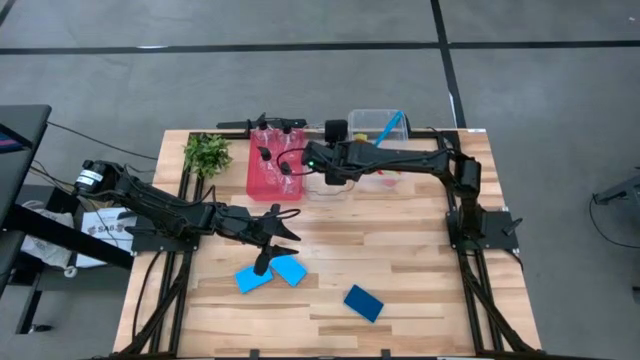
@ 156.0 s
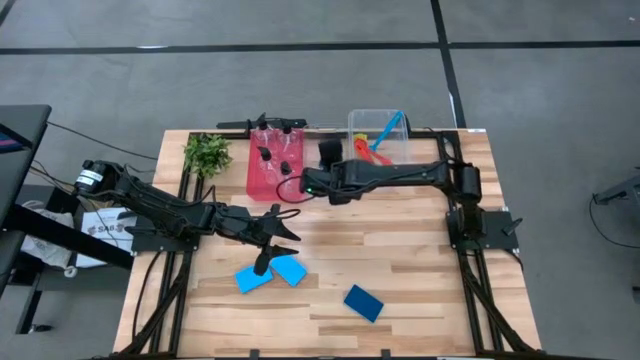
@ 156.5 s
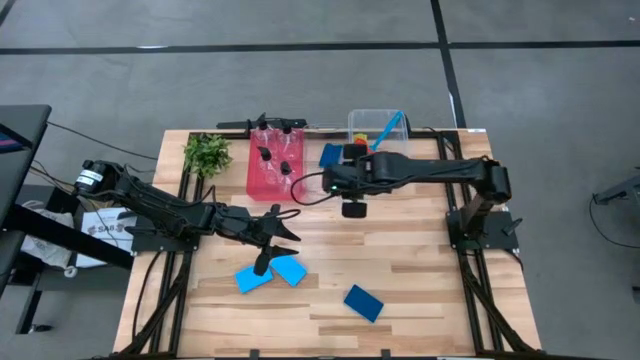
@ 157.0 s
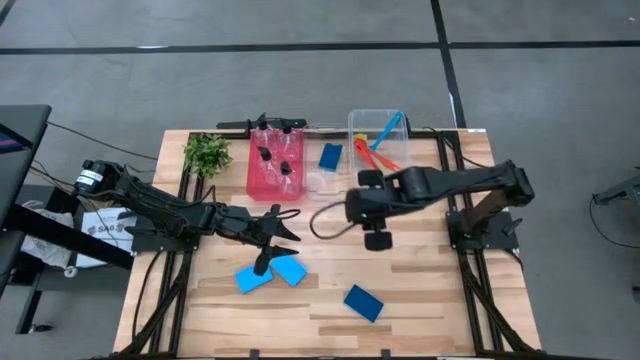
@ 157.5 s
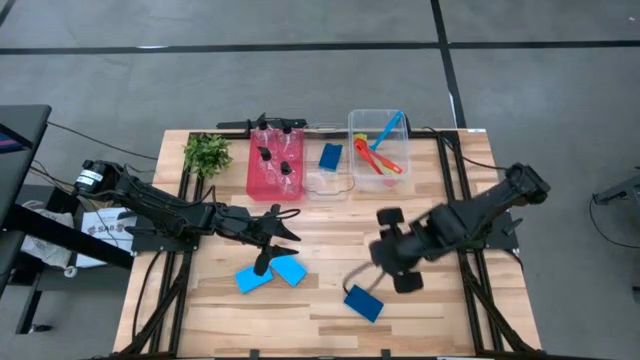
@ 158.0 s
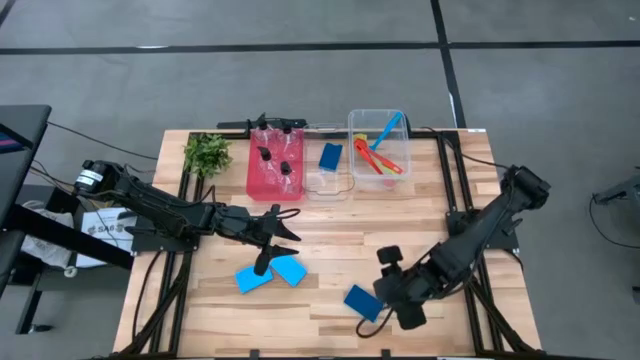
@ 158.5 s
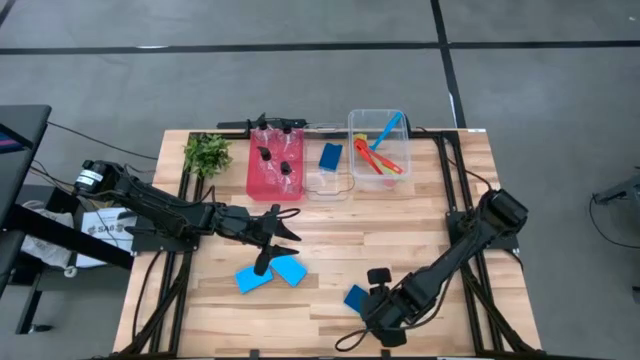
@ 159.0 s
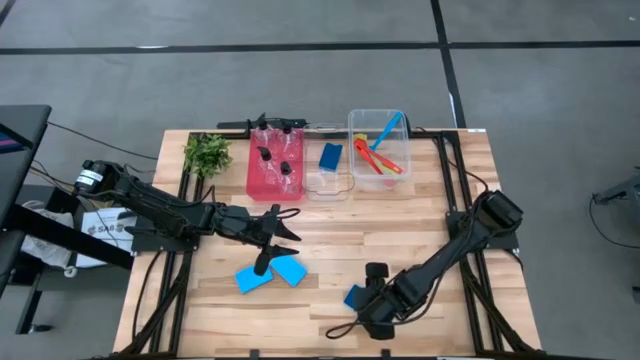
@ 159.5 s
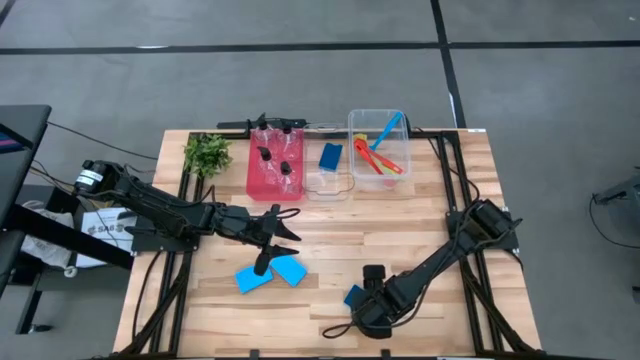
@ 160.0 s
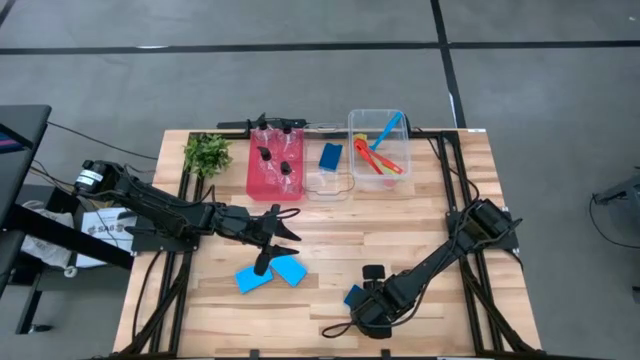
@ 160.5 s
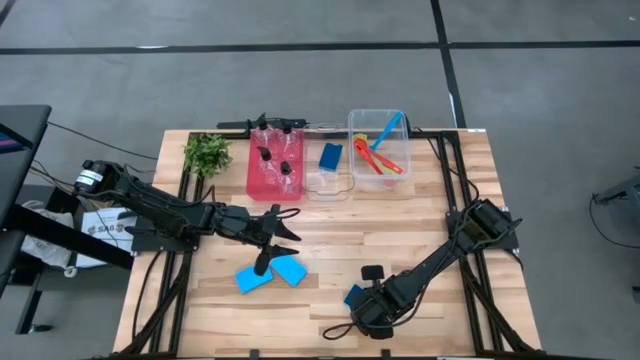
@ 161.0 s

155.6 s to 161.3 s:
Task: Pick & Place Kitchen Sink Supplies
Put the bottom blue sponge into the left transparent bin

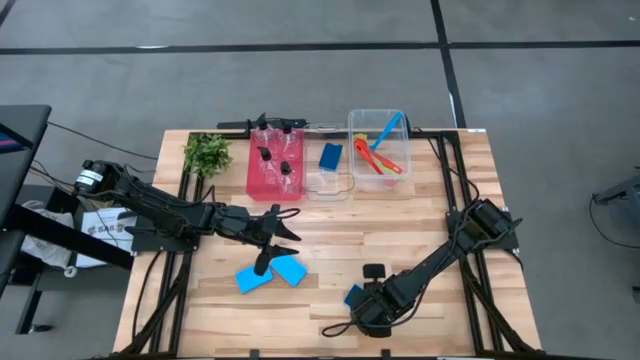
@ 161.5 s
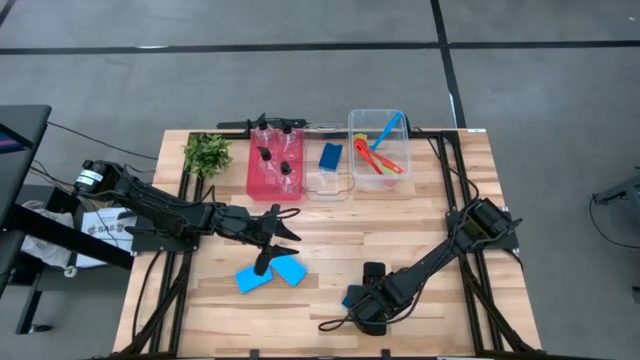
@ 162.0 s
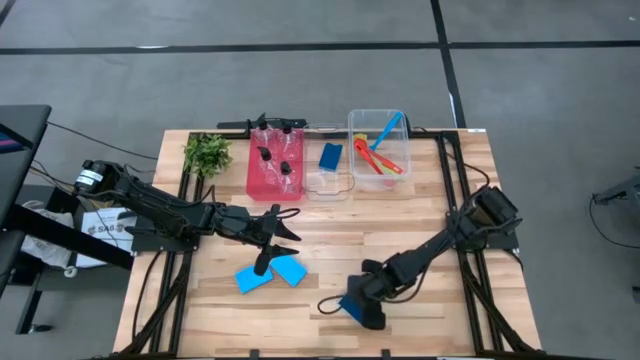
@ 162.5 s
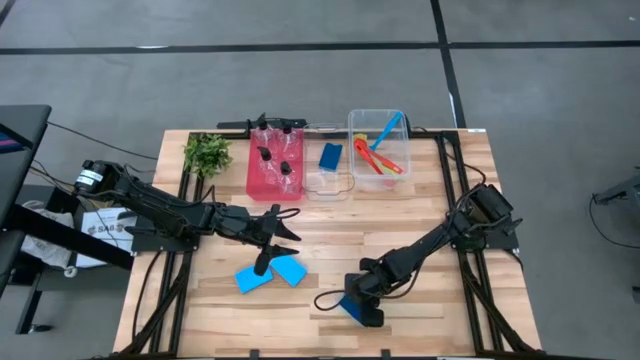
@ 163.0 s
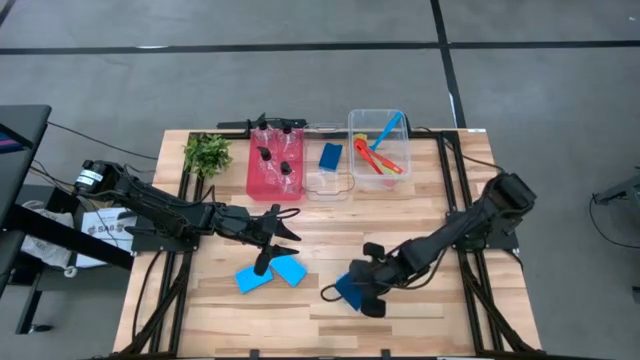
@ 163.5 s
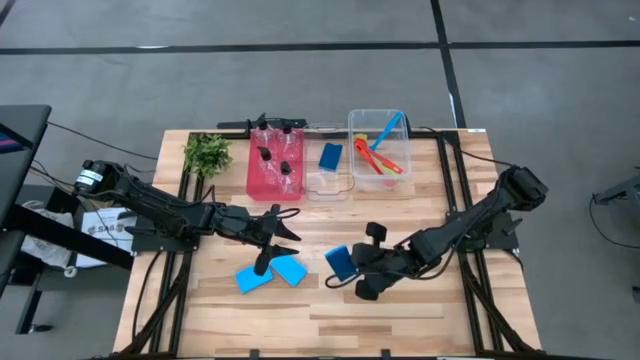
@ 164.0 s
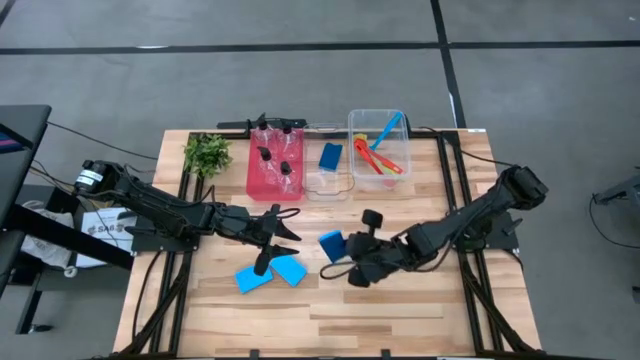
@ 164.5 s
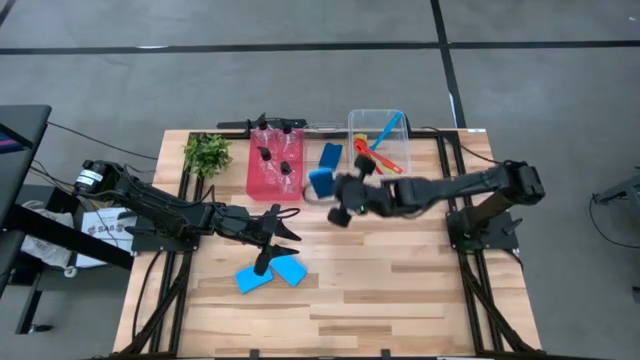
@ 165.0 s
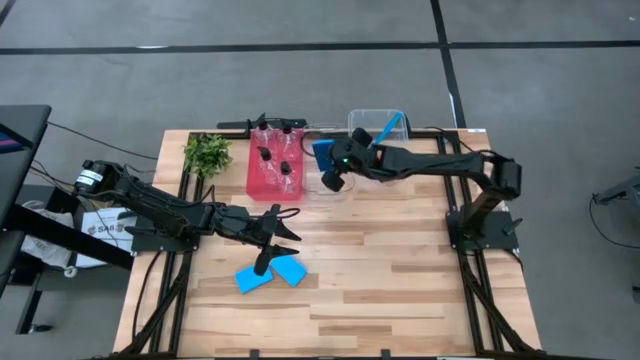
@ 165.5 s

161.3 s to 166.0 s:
Put the bottom blue sponge into the left transparent bin

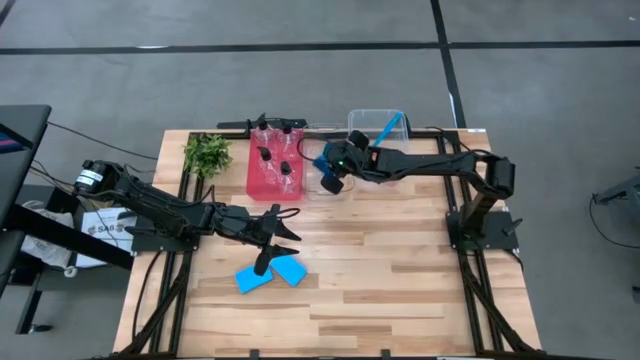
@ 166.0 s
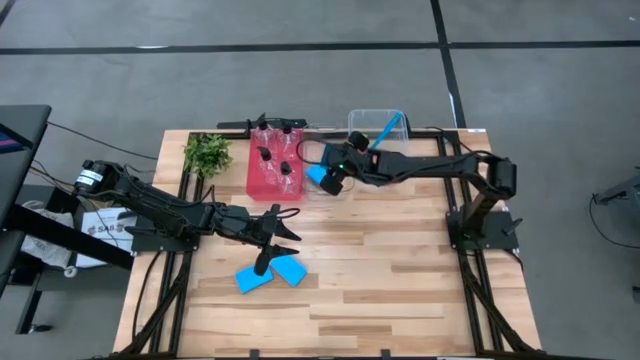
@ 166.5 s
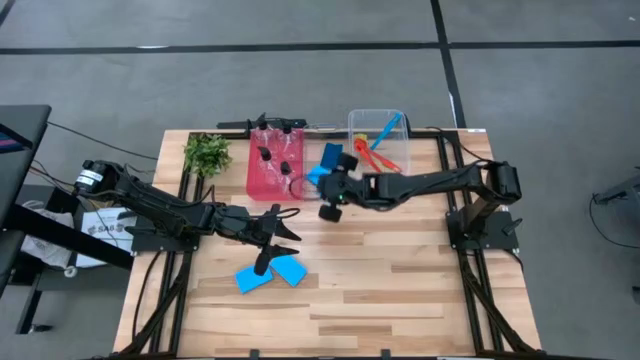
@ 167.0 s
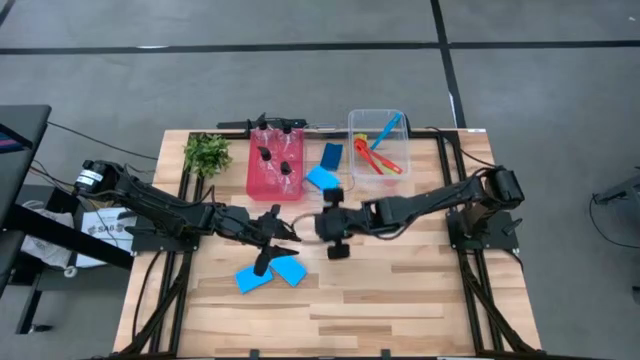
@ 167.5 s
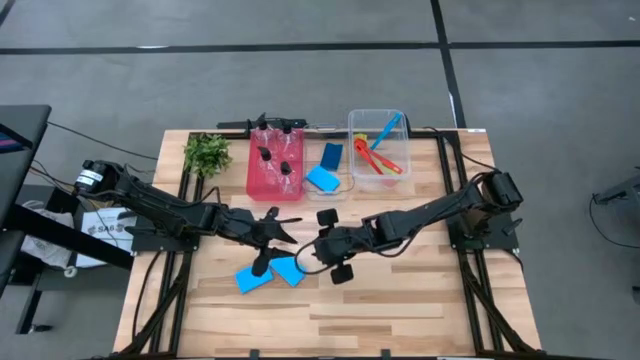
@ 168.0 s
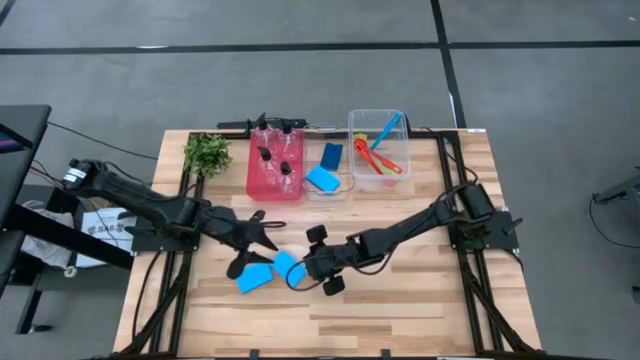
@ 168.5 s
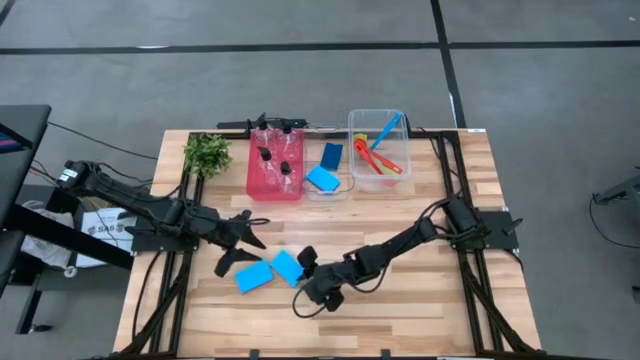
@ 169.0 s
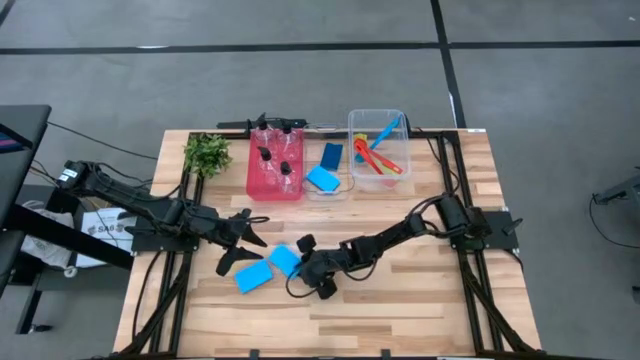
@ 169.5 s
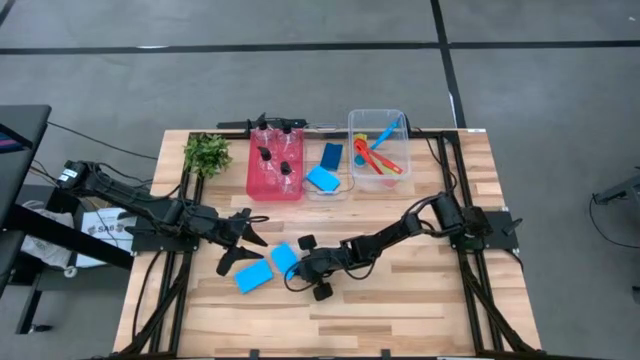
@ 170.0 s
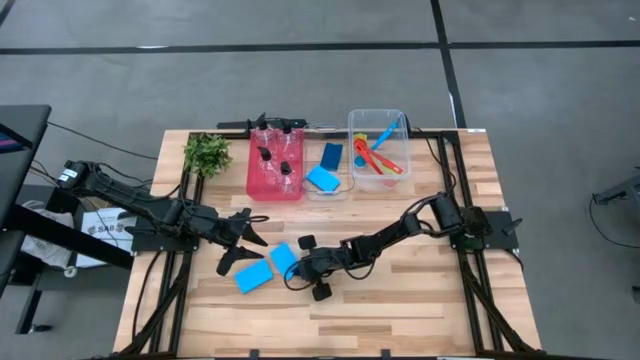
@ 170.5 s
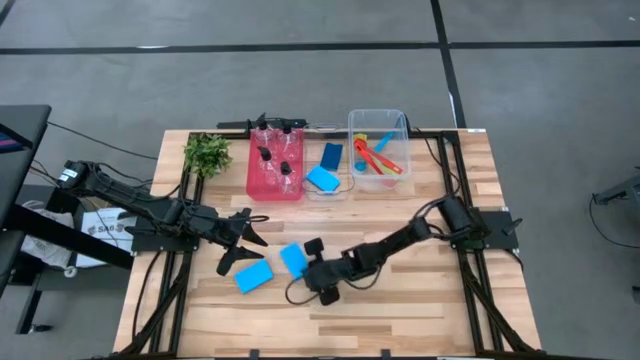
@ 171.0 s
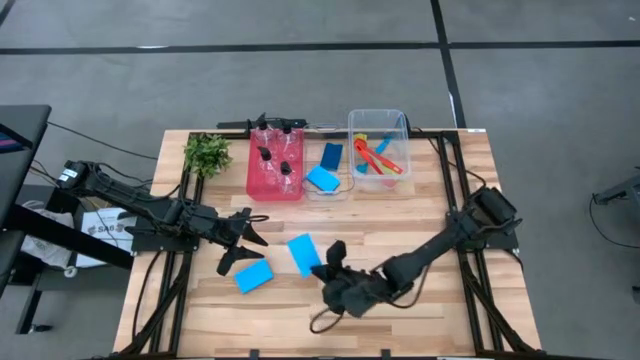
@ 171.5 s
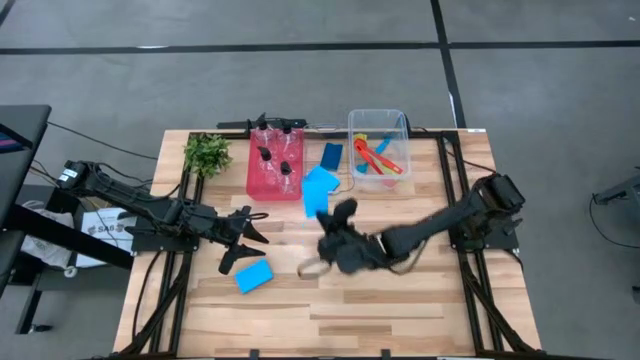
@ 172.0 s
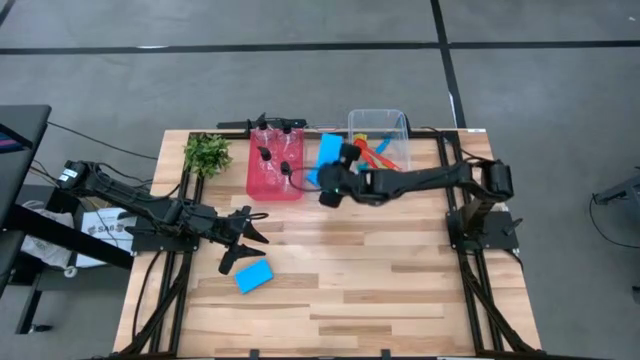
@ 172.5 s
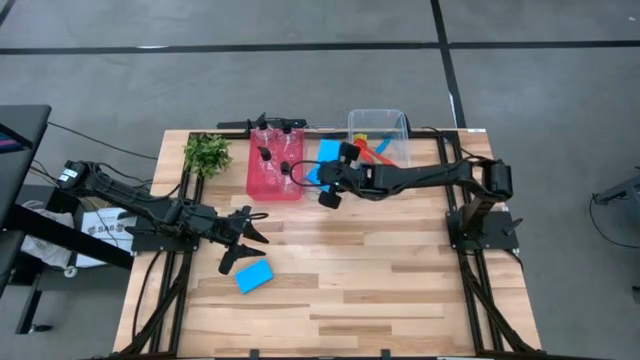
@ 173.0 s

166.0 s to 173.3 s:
Put the right blue sponge into the left transparent bin

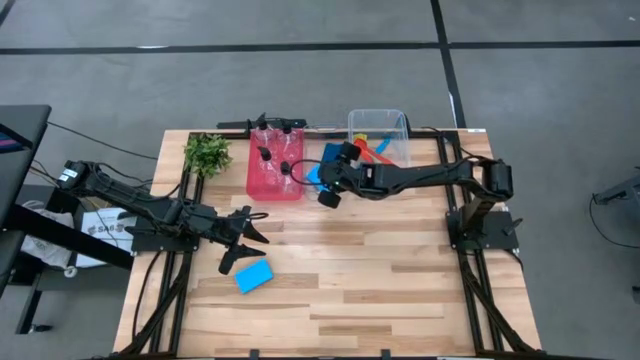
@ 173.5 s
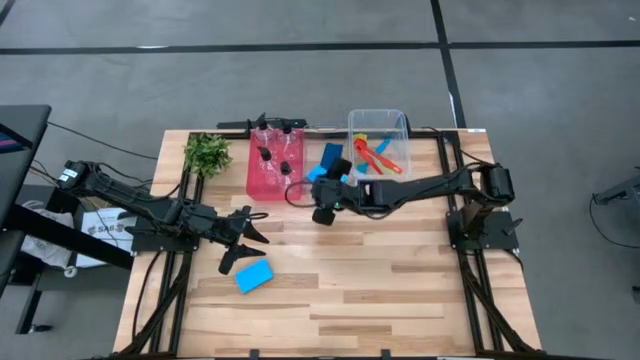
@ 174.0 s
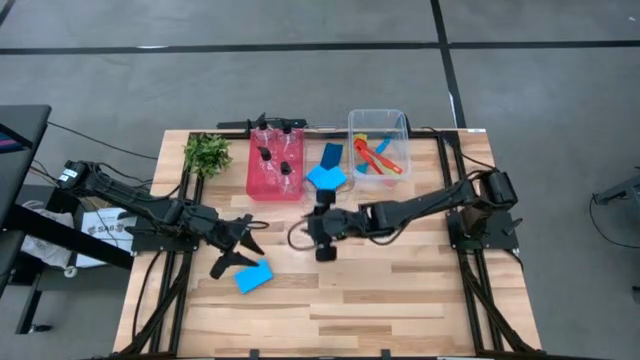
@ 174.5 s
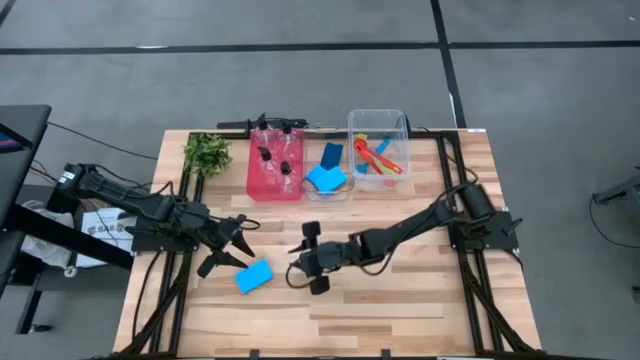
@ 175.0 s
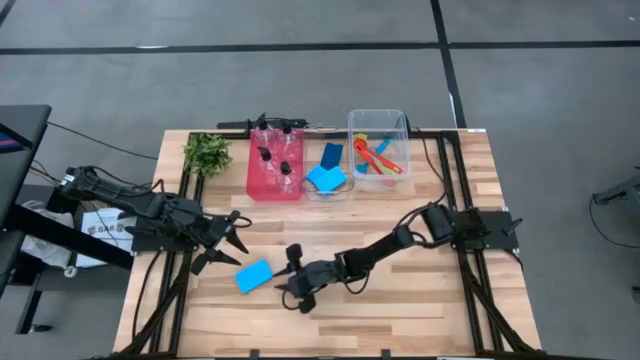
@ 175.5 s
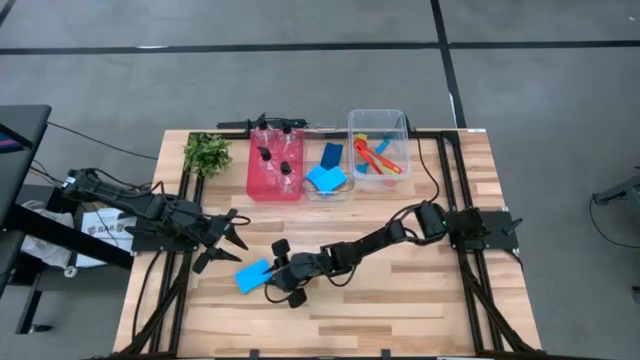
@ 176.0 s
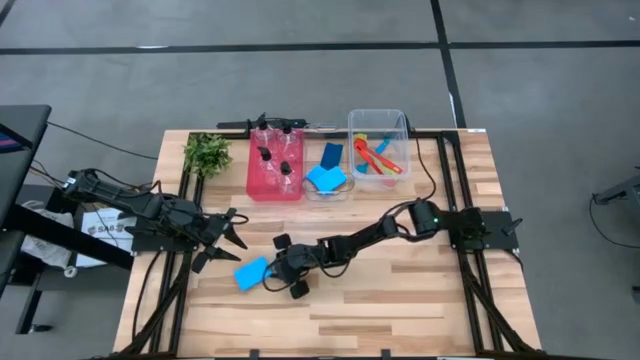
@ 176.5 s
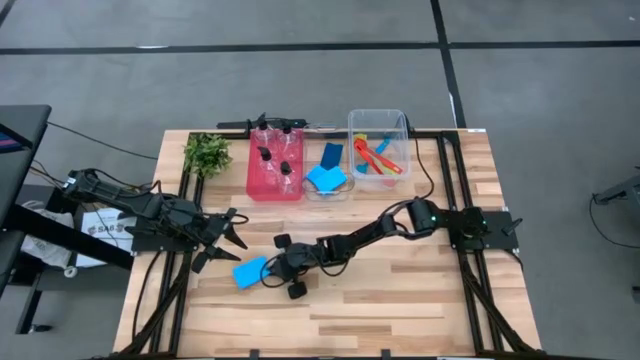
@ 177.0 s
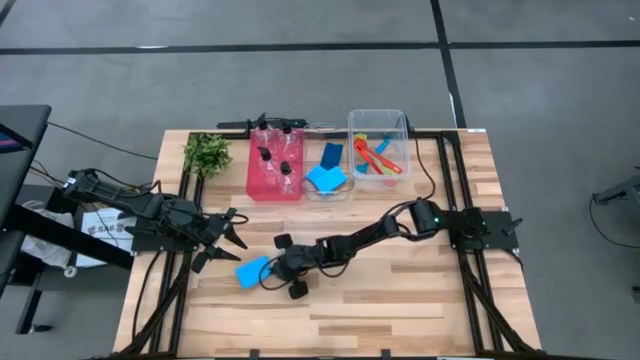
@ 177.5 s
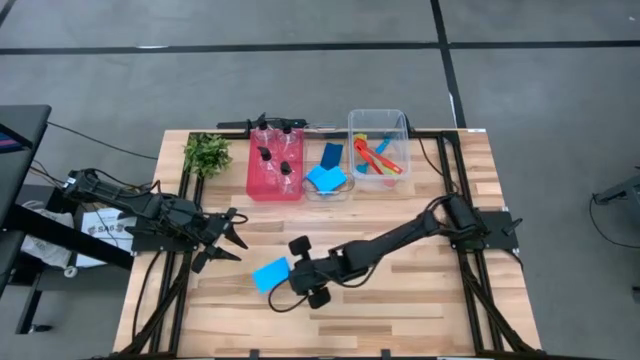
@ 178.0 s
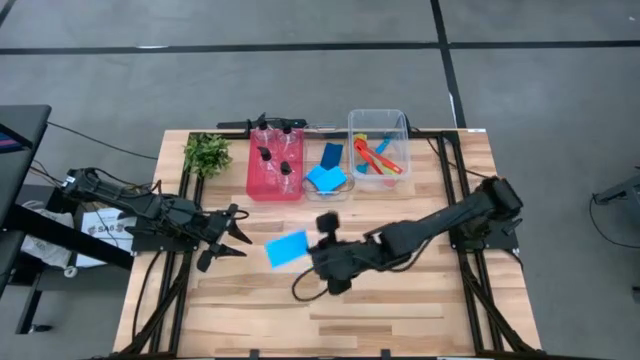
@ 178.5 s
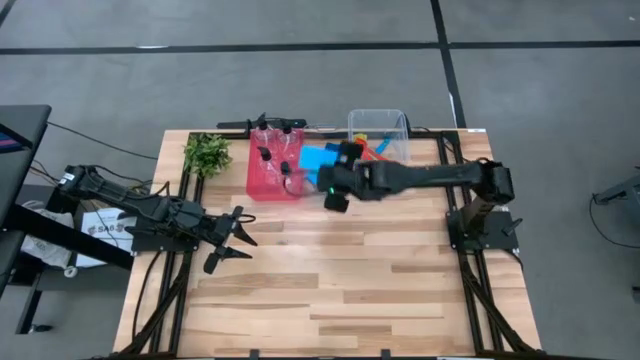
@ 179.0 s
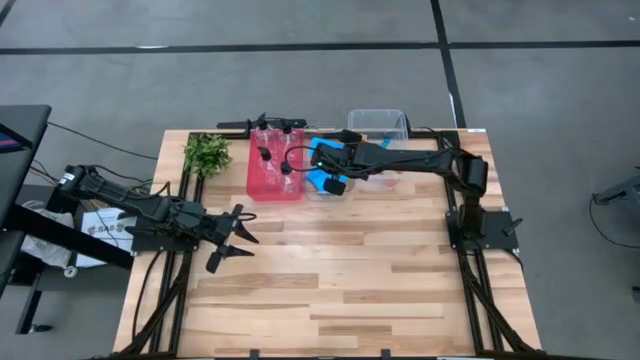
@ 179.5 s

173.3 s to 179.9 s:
Put the blue sponge into the left transparent bin
